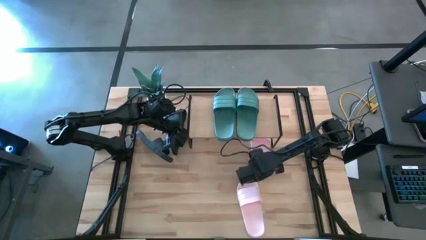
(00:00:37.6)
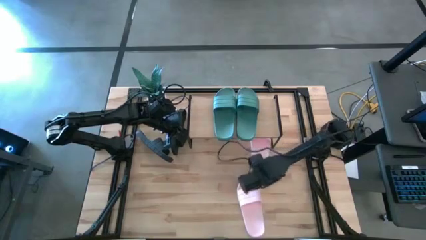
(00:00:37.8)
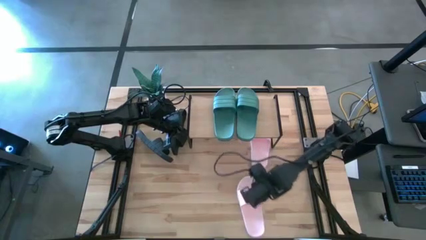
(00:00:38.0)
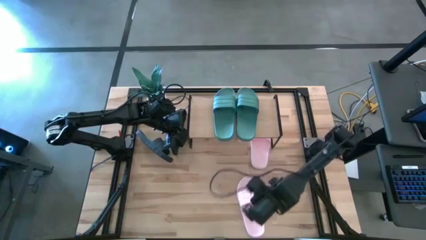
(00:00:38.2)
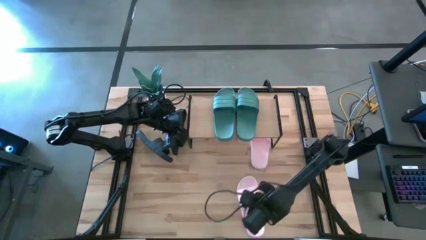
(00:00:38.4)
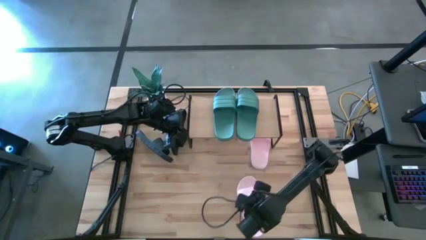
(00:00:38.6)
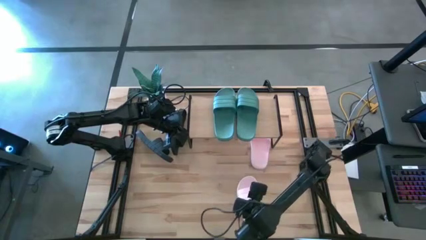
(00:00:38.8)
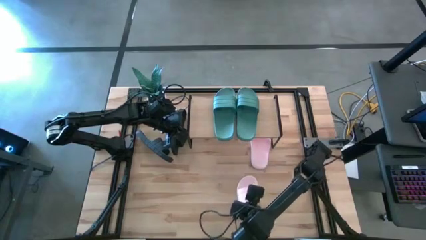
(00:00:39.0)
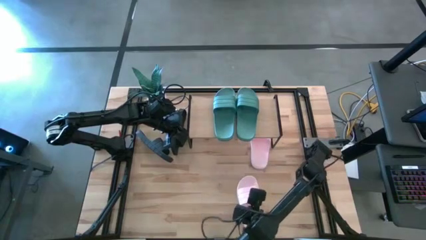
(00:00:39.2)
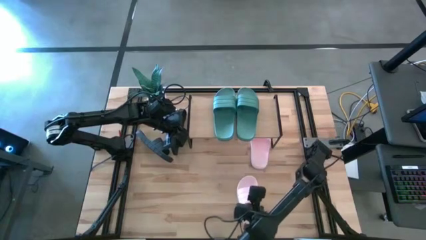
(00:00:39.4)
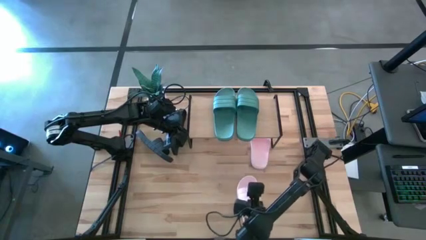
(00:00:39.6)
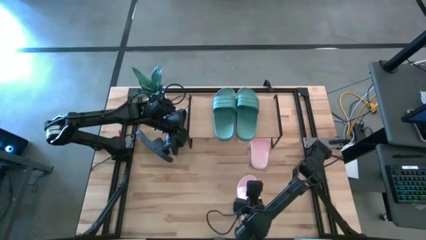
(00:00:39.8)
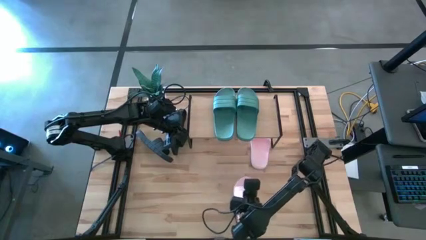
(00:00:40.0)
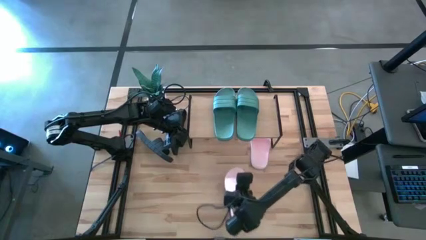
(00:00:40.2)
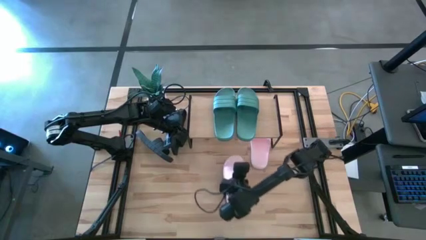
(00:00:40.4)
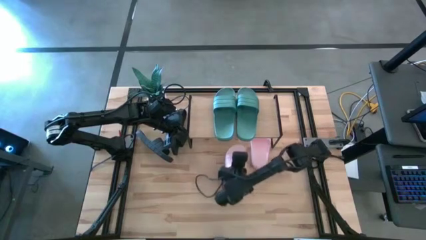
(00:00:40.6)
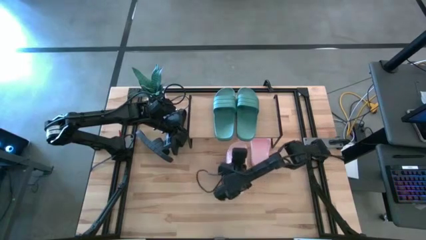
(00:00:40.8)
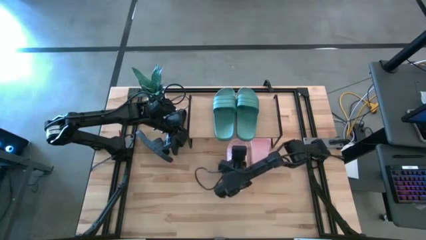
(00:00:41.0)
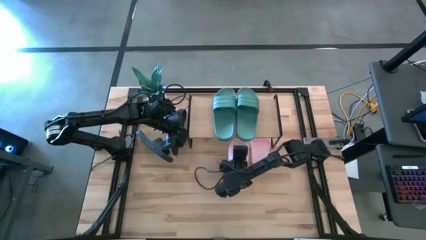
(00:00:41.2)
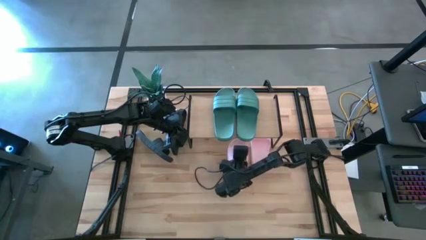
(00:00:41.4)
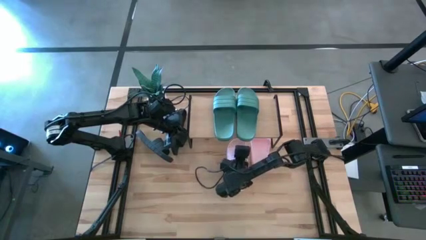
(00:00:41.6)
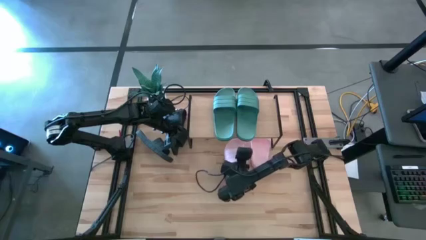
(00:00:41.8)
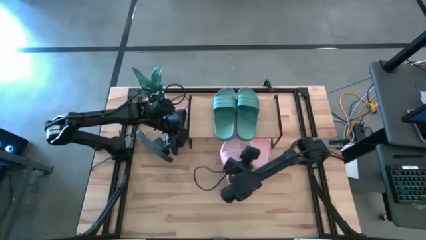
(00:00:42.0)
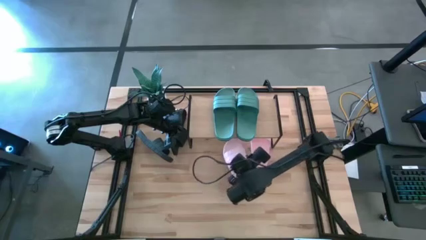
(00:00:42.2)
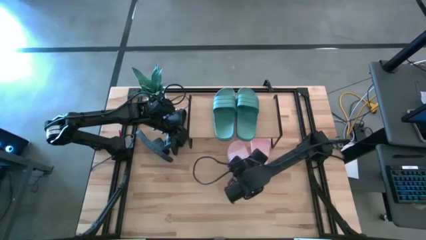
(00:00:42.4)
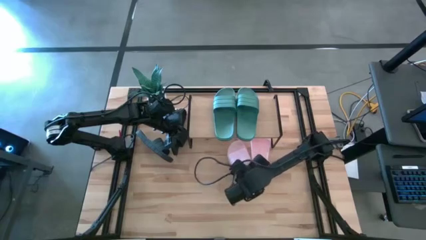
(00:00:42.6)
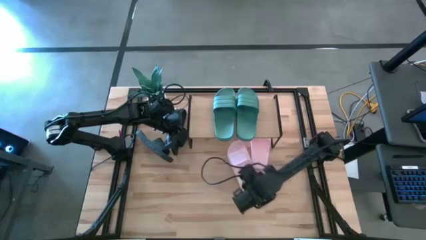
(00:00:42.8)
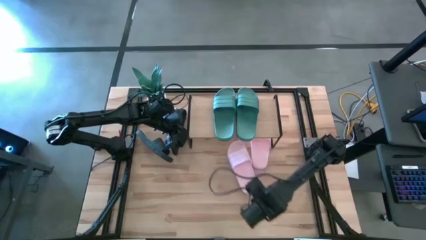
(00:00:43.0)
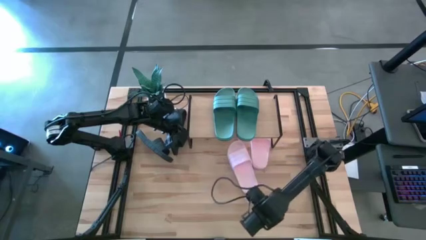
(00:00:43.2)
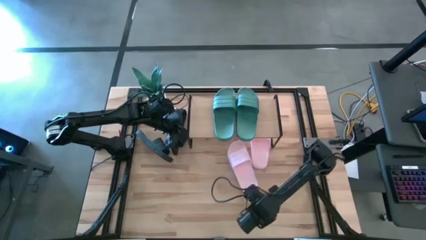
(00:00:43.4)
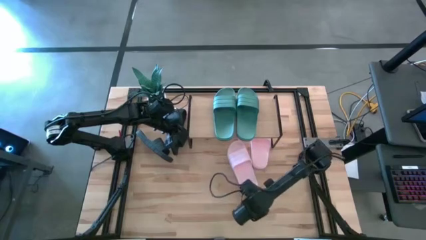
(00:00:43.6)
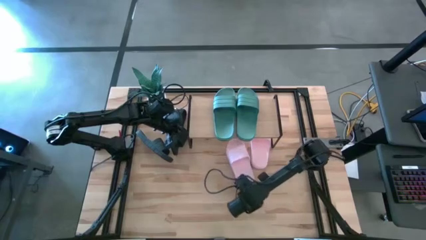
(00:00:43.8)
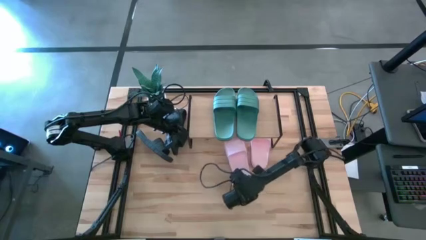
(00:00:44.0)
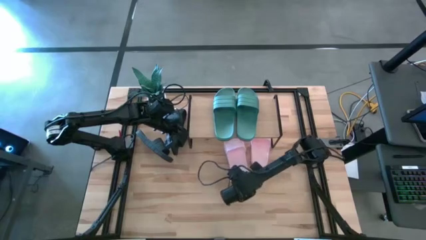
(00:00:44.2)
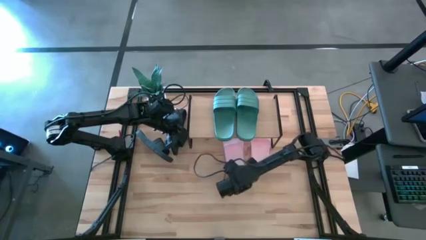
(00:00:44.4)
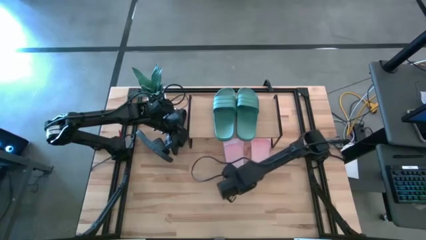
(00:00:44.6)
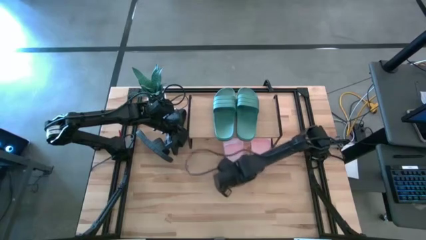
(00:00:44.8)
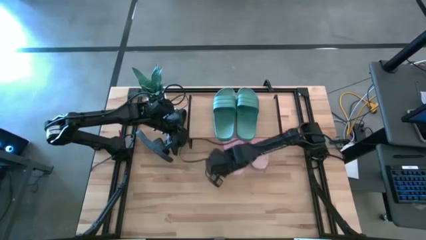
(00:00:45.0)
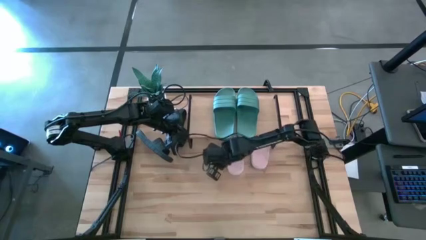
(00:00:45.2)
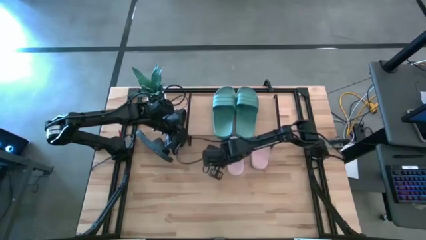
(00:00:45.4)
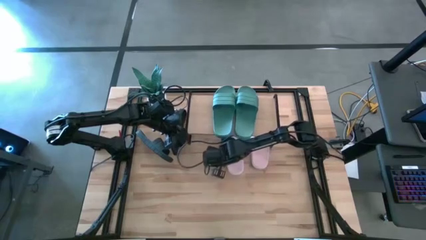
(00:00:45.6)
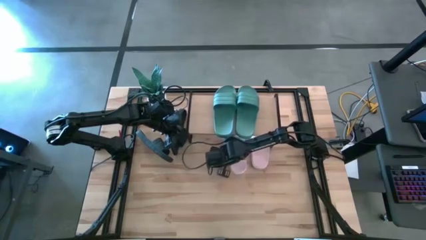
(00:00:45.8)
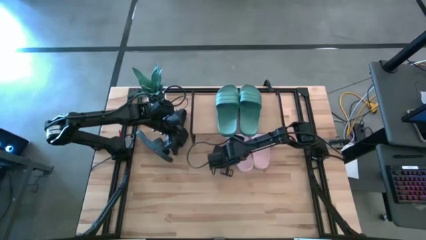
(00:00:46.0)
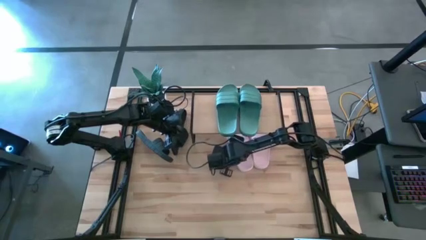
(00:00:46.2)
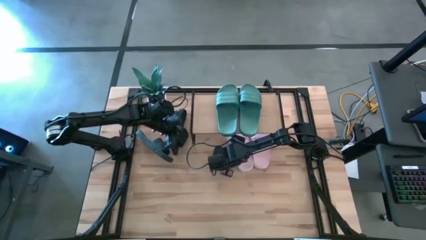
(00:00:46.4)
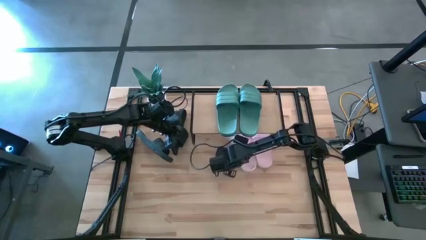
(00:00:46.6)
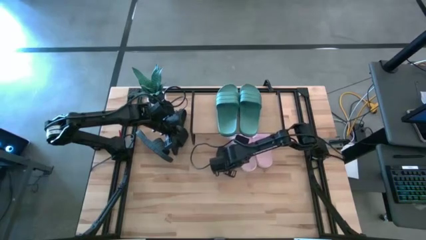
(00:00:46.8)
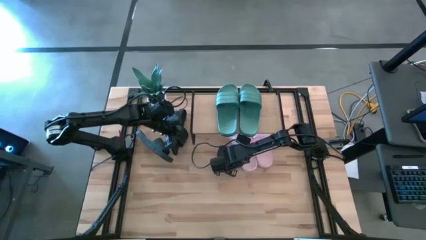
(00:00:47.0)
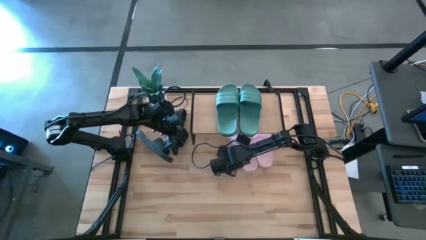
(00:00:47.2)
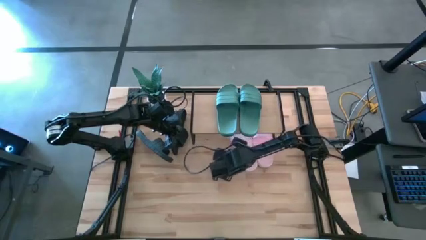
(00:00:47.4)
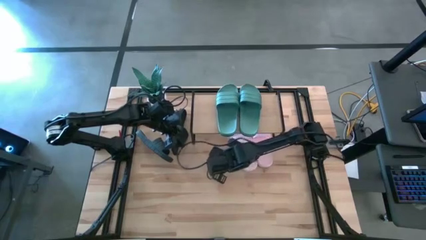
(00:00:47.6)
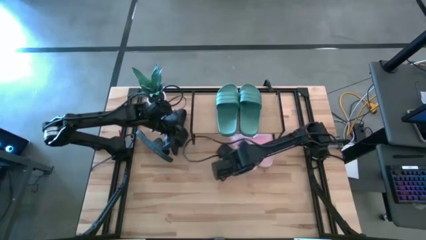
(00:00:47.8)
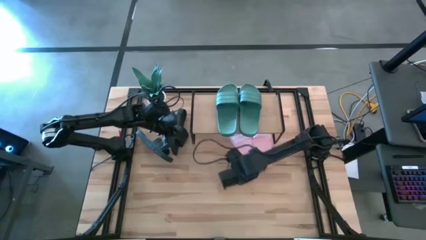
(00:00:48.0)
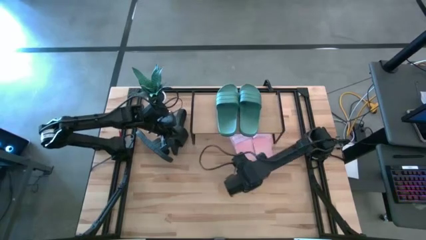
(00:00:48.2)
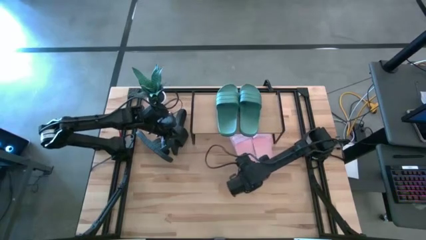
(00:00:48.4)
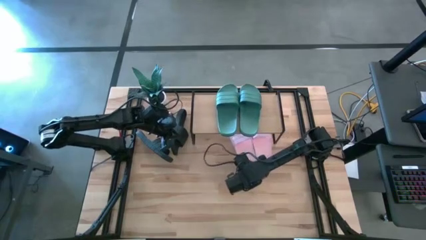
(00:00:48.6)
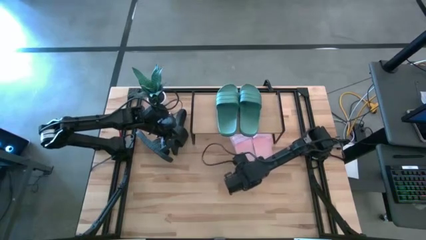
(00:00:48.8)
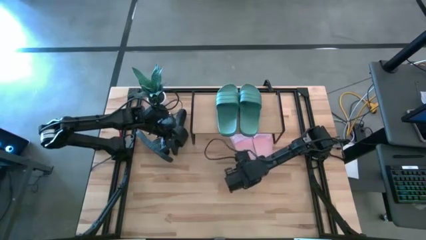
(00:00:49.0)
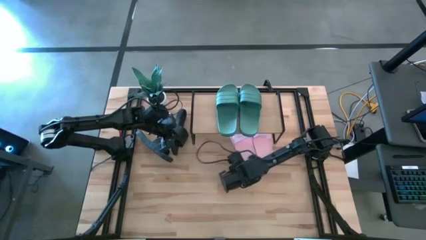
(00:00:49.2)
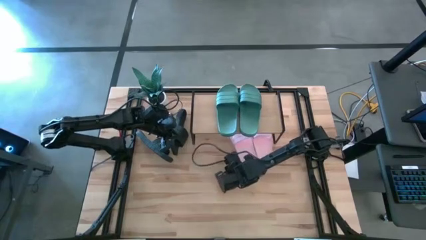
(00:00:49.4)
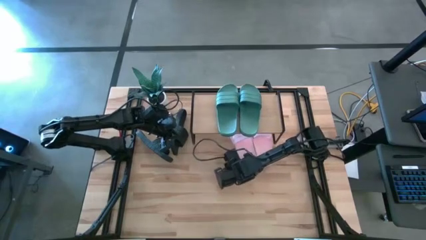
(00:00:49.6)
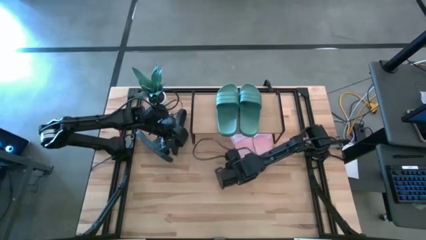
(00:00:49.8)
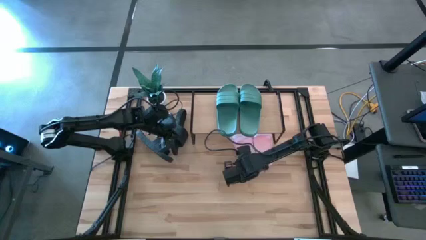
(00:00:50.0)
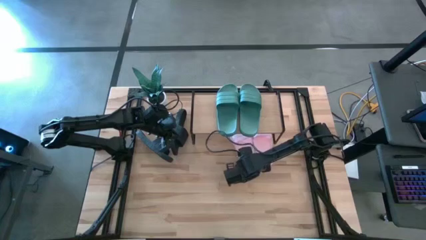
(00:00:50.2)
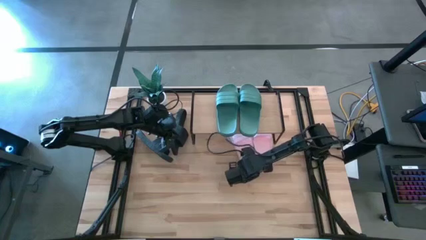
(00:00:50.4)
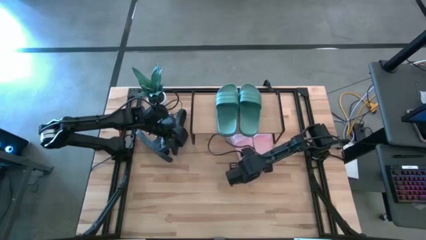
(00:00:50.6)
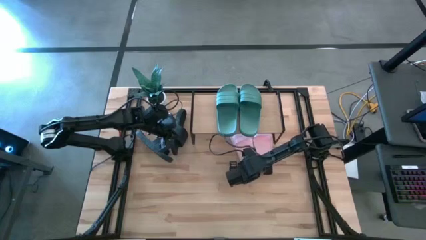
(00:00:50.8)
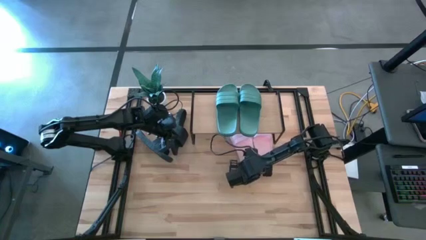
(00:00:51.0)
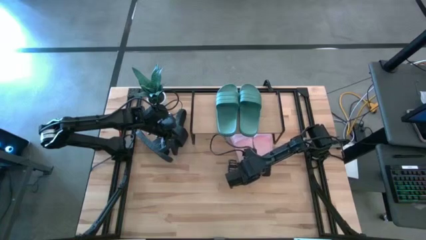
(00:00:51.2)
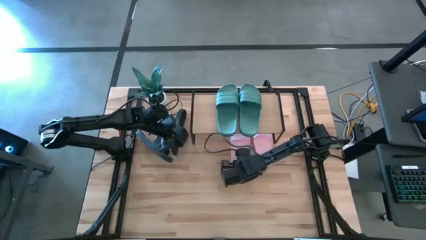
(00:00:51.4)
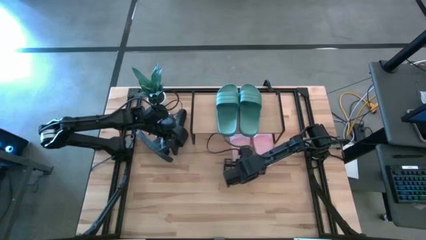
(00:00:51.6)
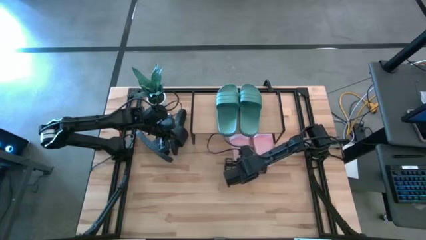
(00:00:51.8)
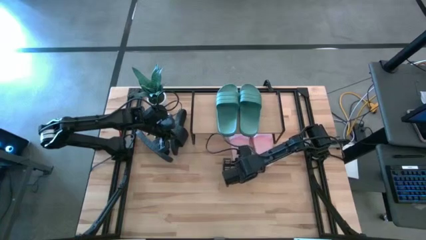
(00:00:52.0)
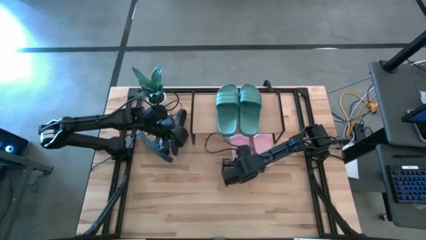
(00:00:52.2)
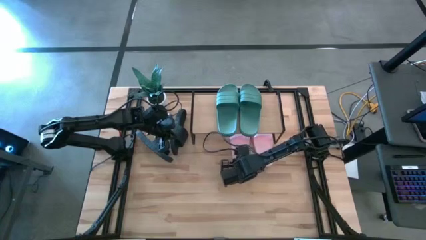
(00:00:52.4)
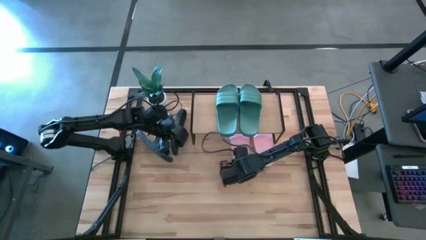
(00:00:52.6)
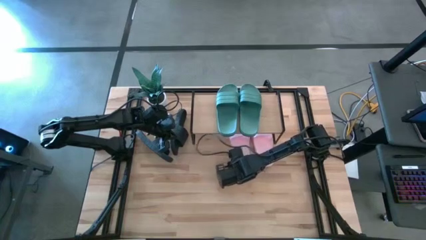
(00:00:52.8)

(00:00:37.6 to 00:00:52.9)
Task: Pick and place slides into the shelf
Put the left pink slipper under the shelf
